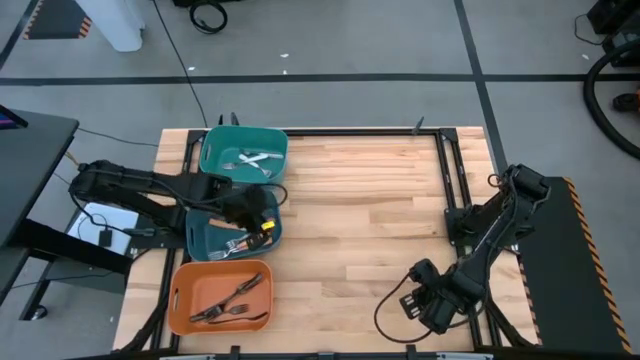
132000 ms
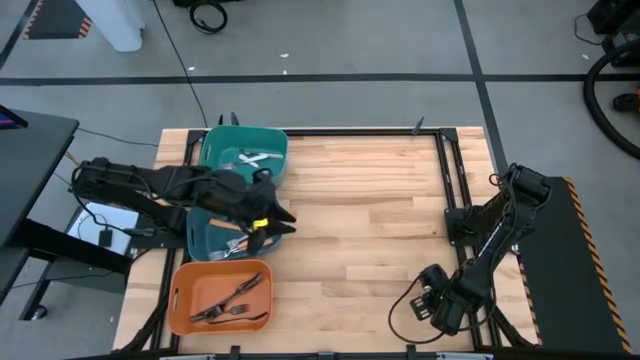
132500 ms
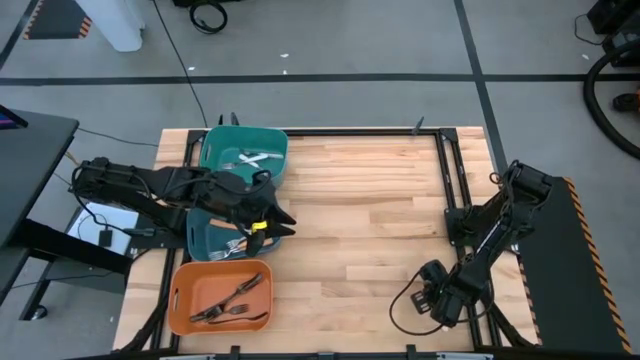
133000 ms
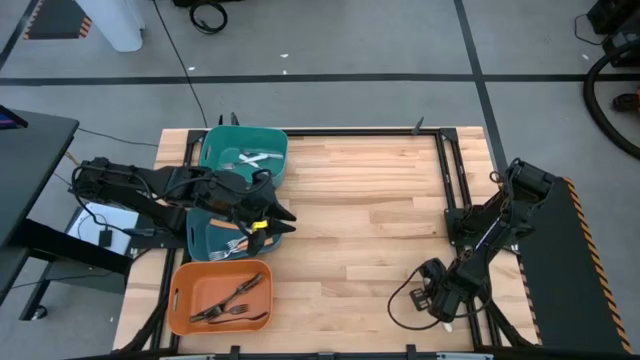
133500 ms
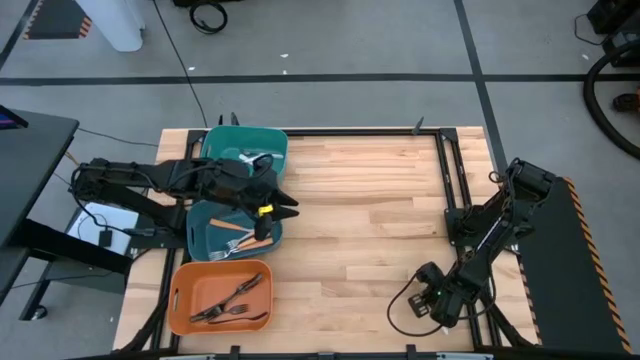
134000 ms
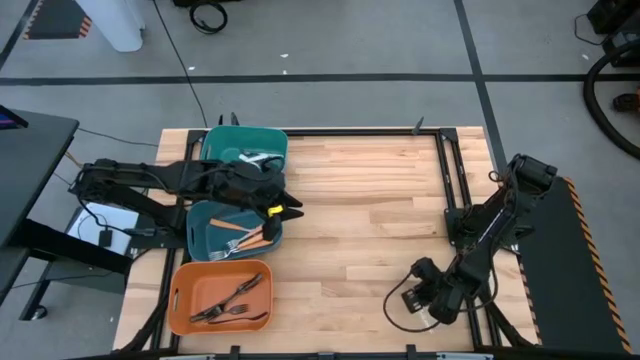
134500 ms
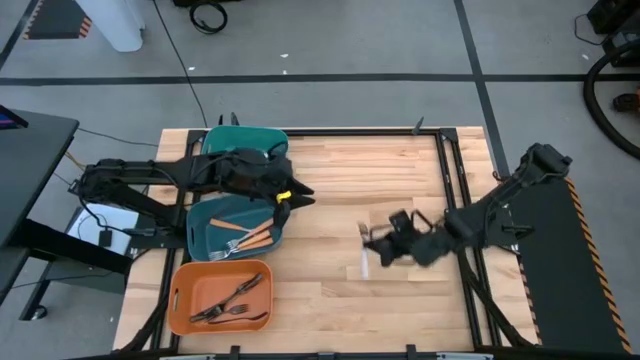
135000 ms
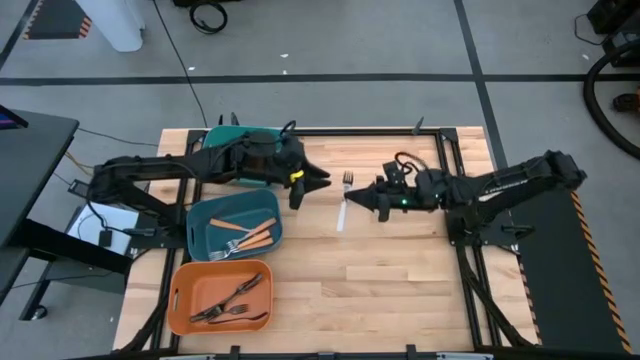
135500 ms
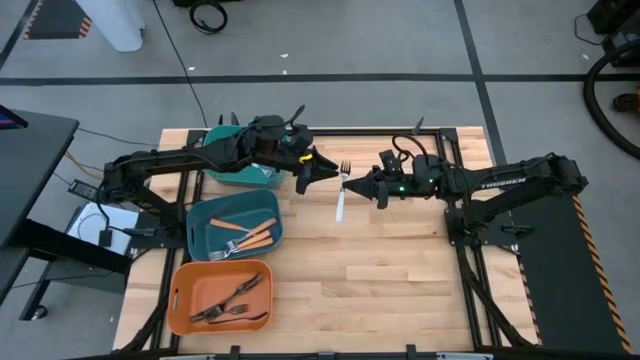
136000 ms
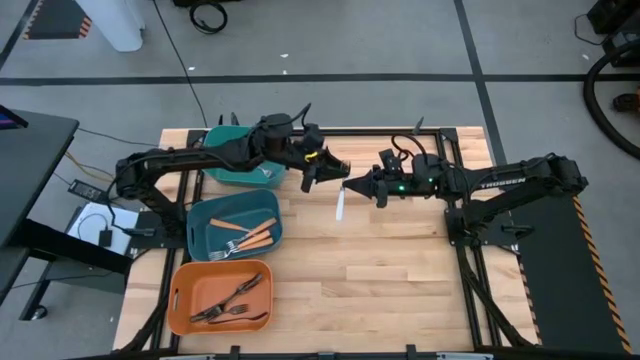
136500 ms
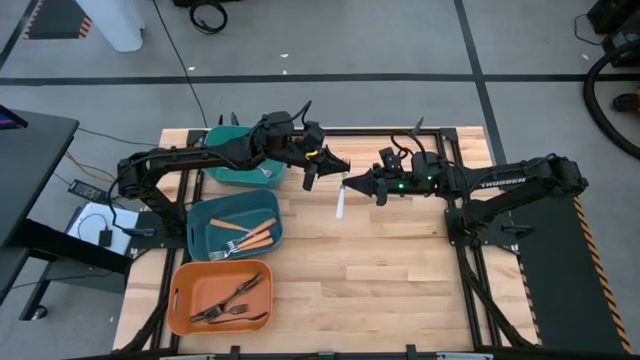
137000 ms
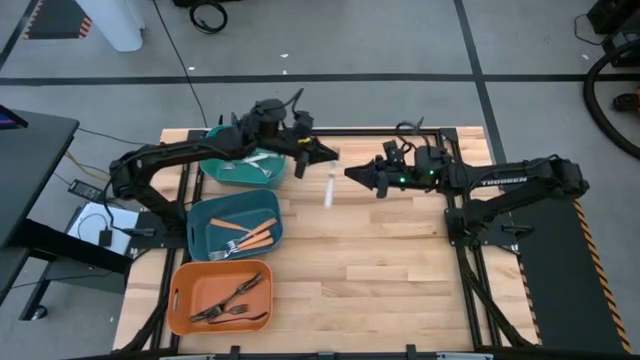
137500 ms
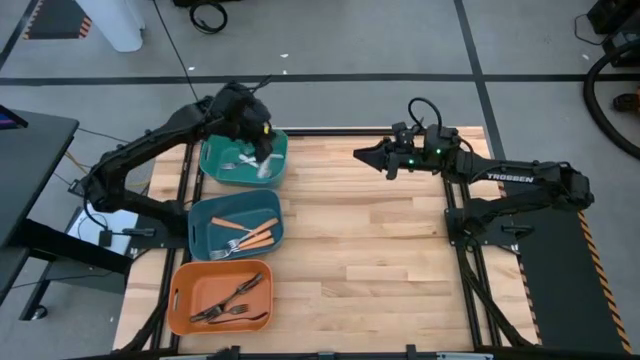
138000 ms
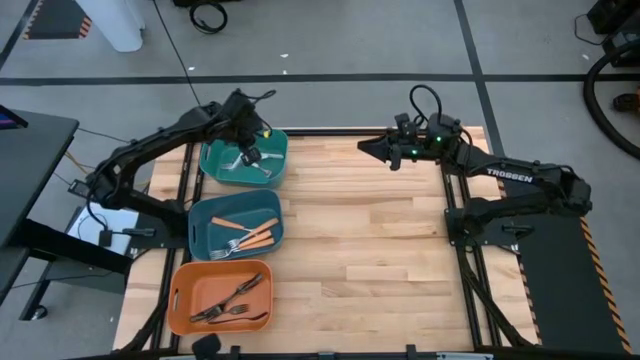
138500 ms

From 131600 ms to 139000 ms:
Task: Sort silverware by color (type)
Put the white fork into the green bin

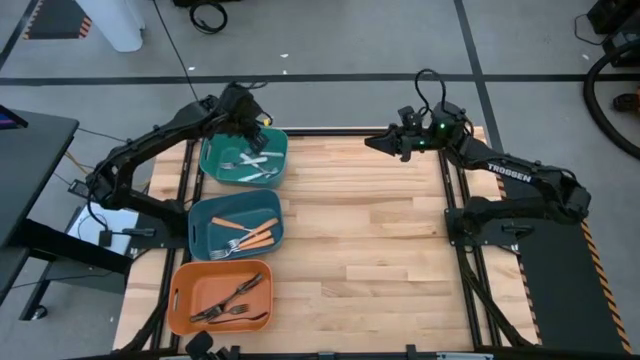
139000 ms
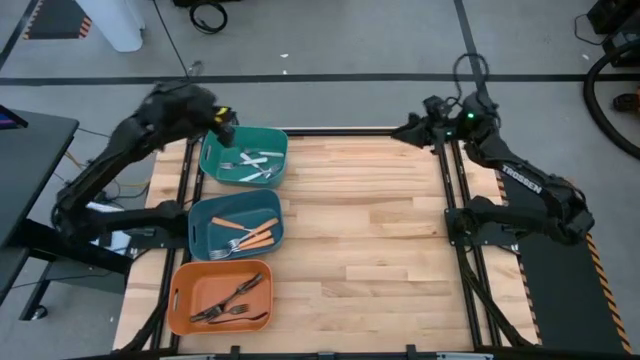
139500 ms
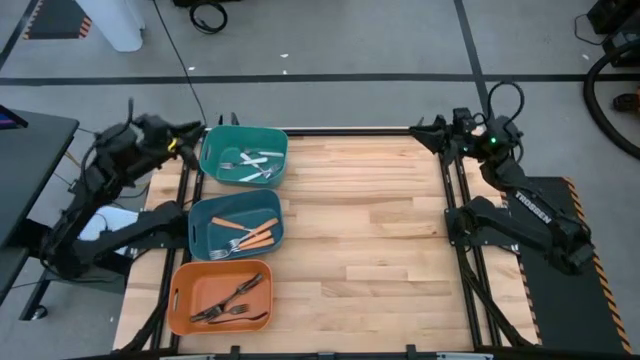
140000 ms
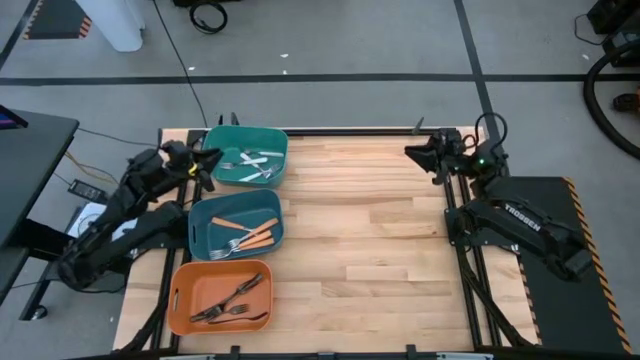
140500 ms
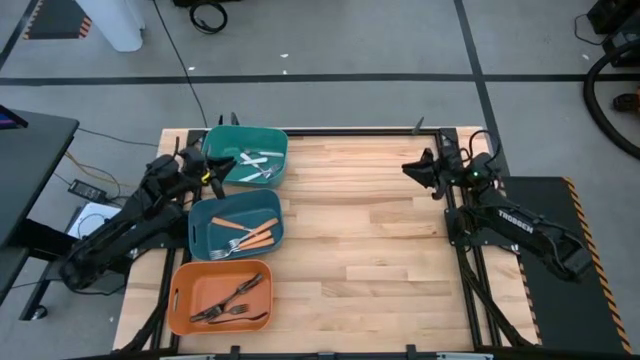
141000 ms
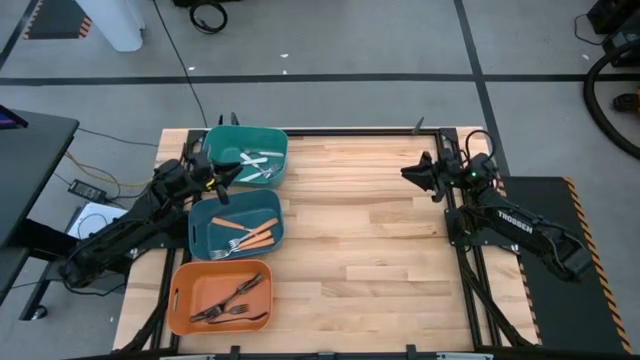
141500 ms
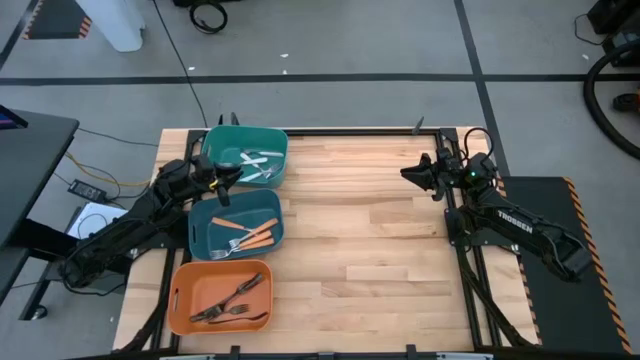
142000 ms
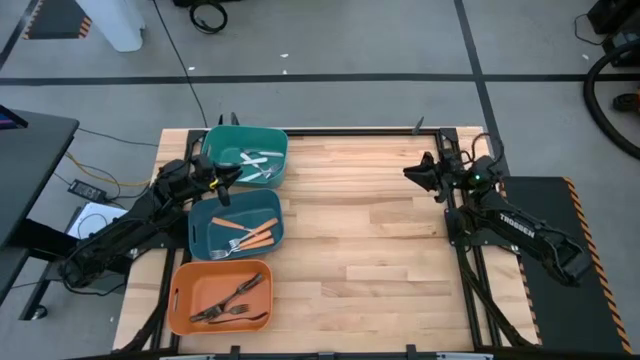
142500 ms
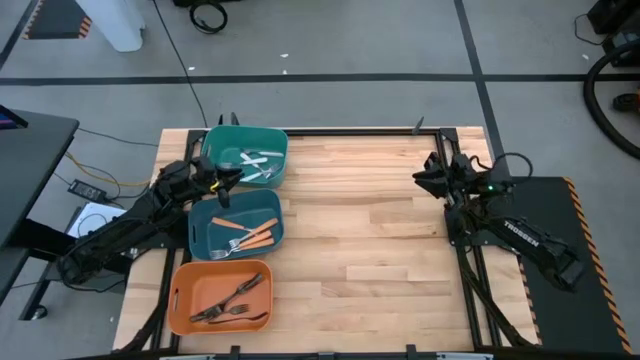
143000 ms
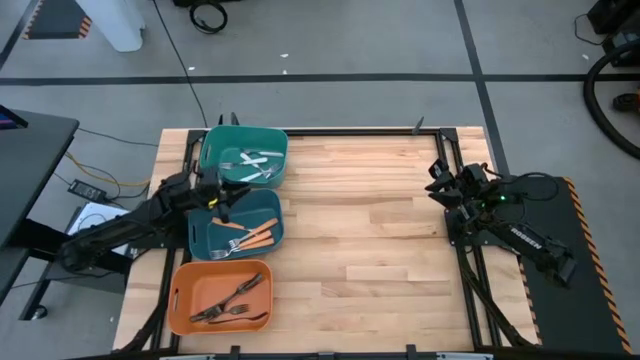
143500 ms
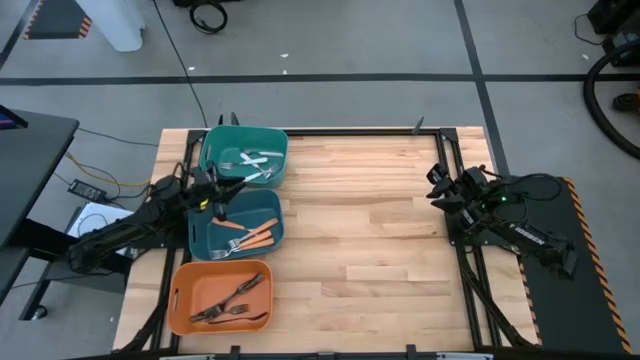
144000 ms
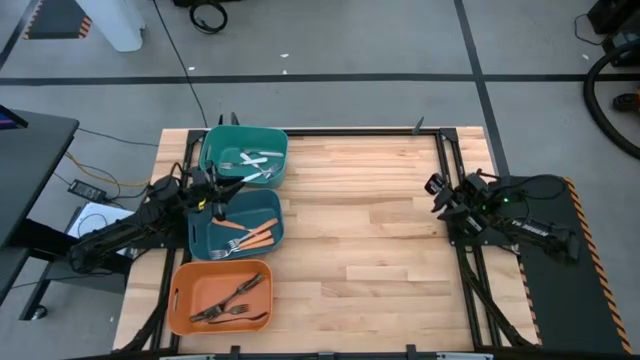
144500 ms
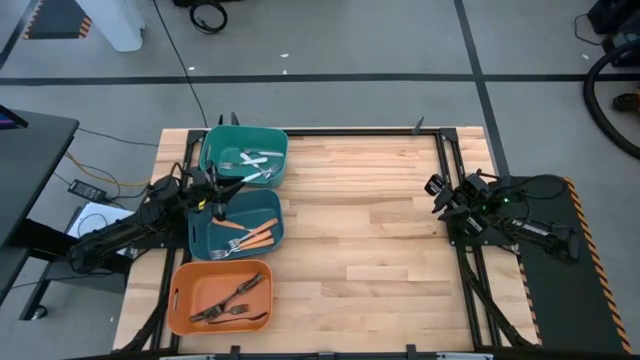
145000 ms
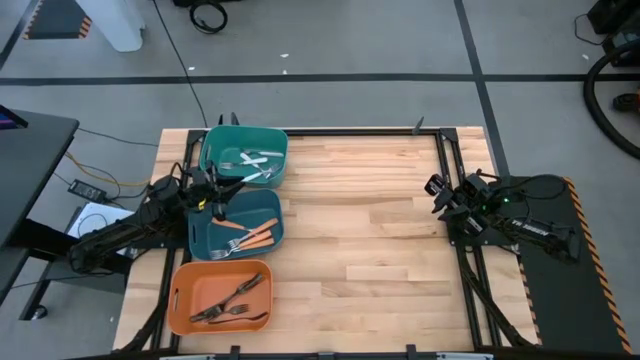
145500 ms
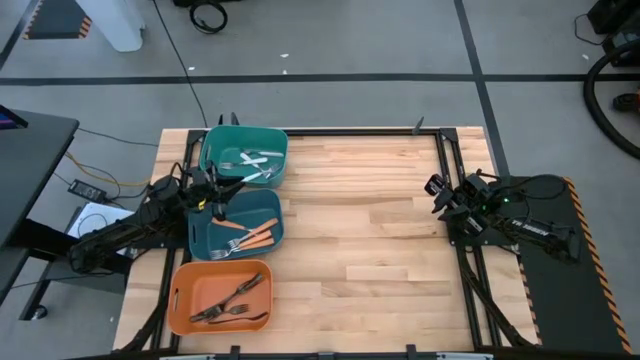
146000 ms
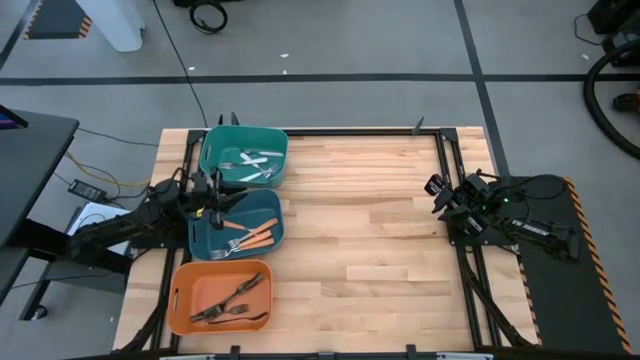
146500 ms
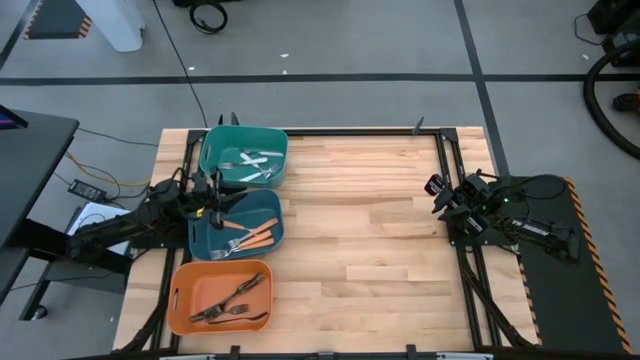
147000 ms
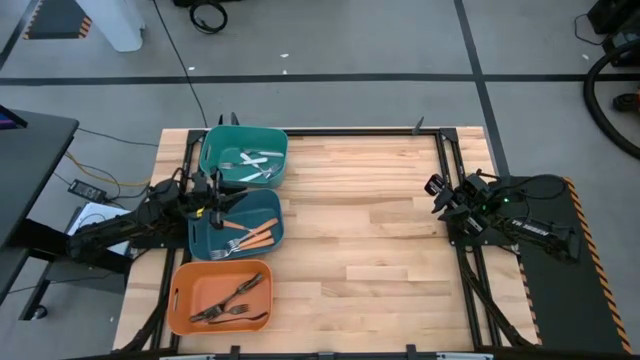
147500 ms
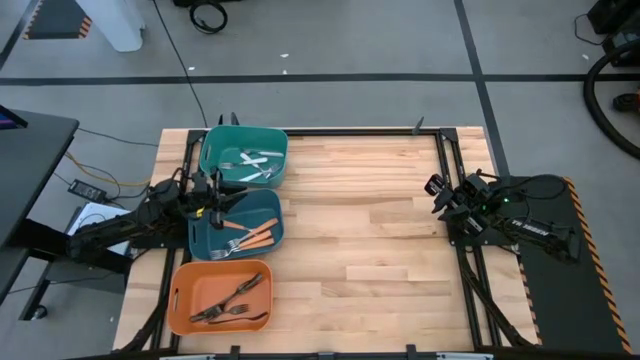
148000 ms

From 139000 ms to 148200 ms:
Return to home Position

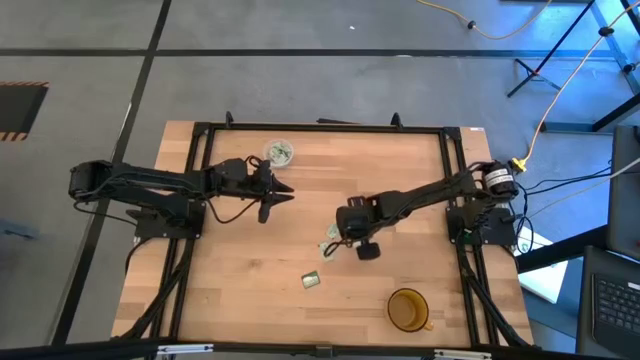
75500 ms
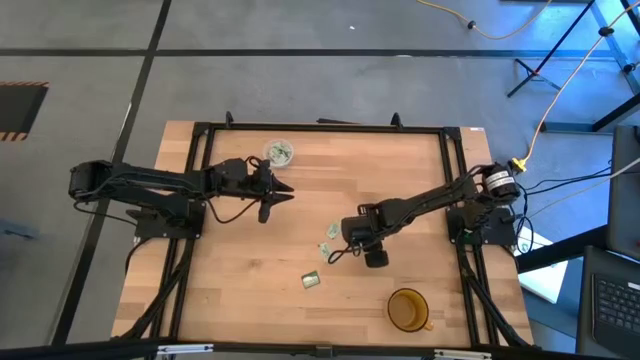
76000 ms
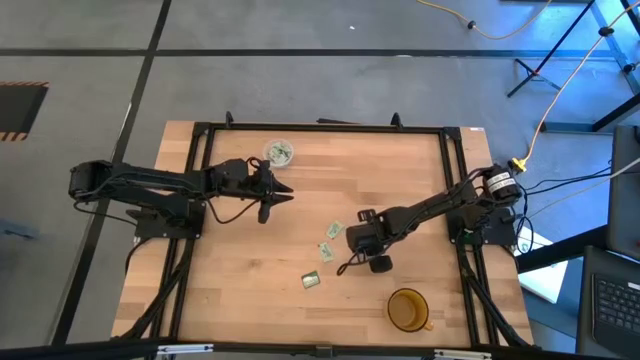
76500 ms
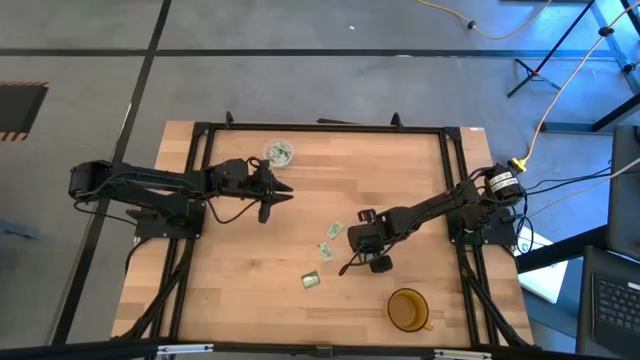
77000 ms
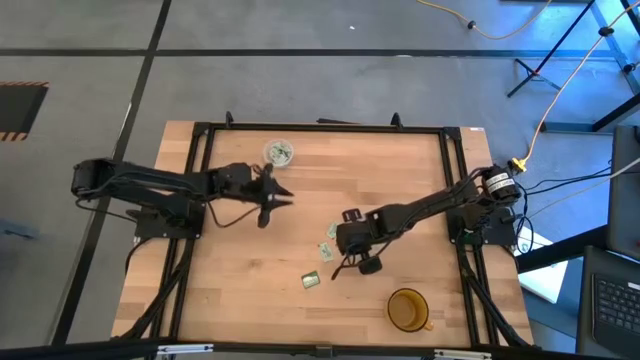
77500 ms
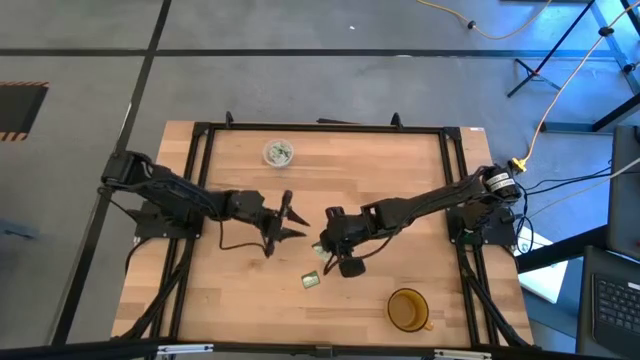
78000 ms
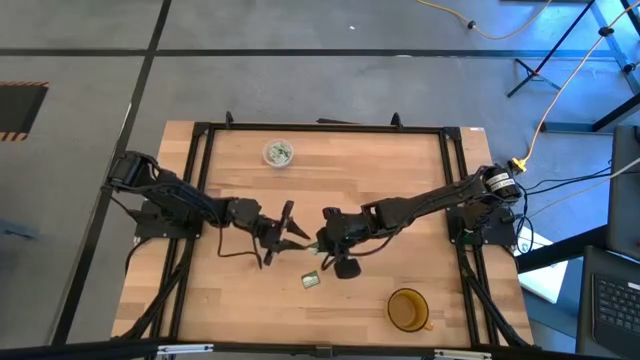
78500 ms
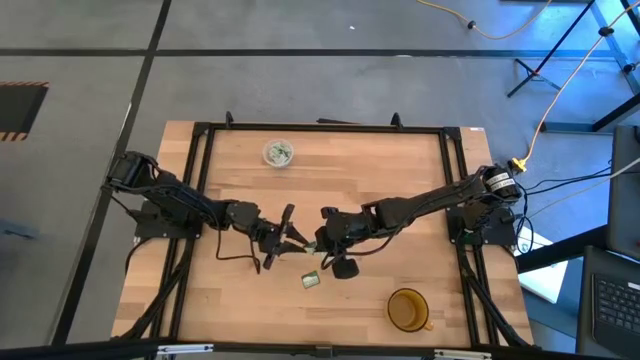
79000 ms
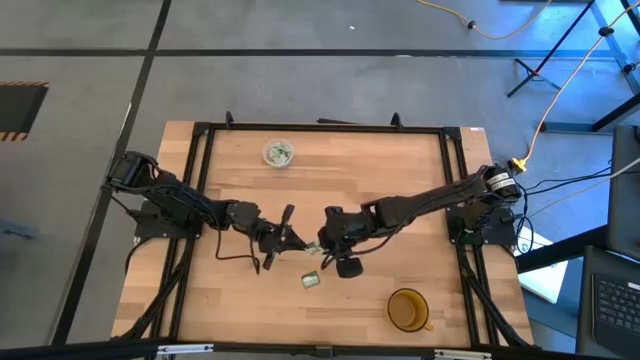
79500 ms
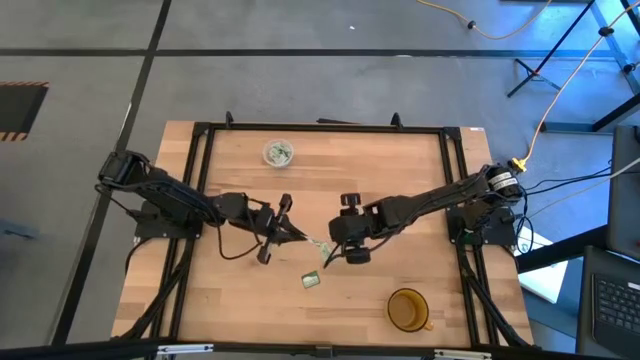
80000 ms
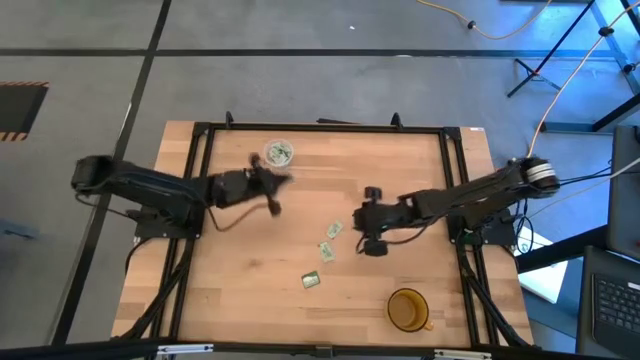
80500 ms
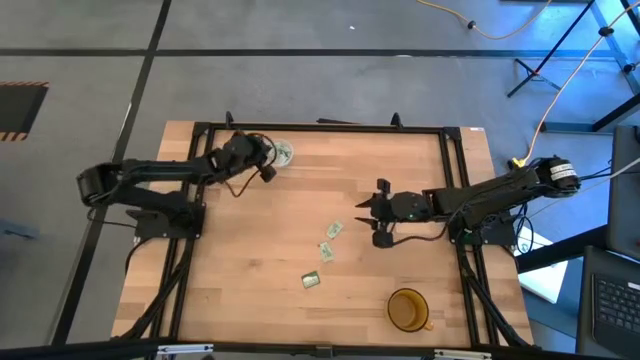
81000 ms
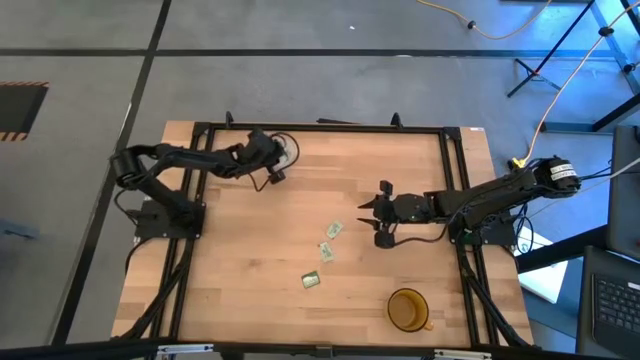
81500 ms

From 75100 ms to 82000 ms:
Task: Pick and place Stevia / Truvia into bins
Put the truvia packet into the transparent container
